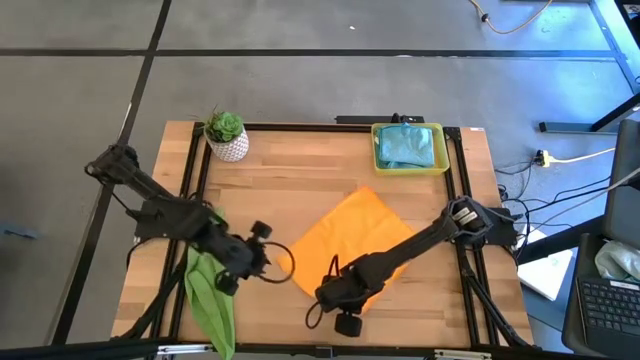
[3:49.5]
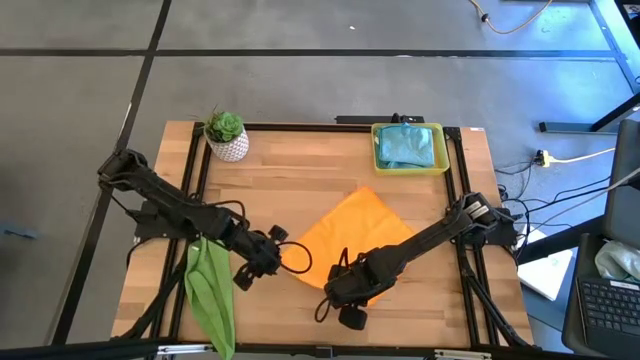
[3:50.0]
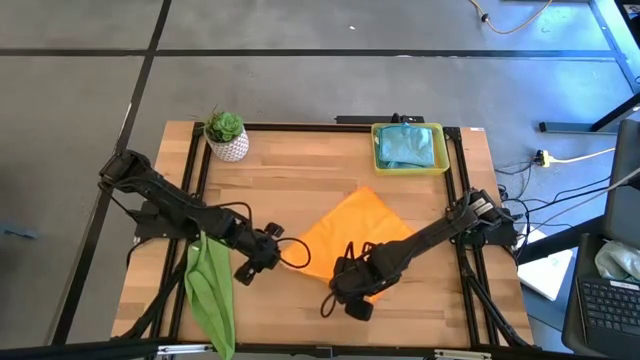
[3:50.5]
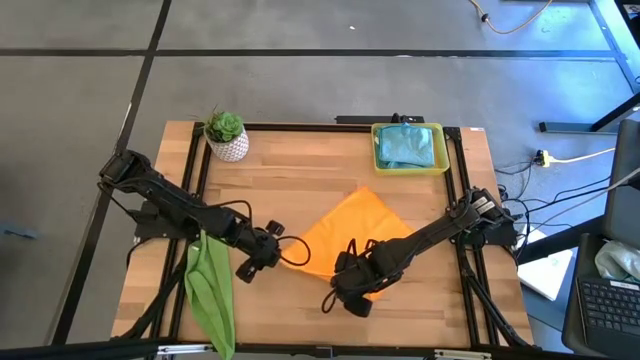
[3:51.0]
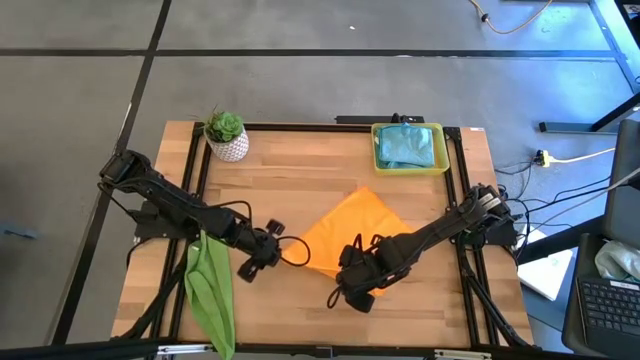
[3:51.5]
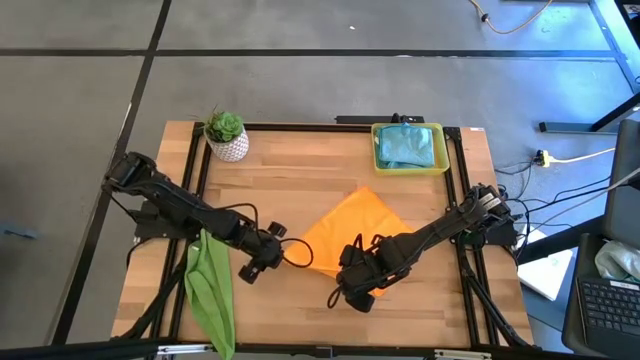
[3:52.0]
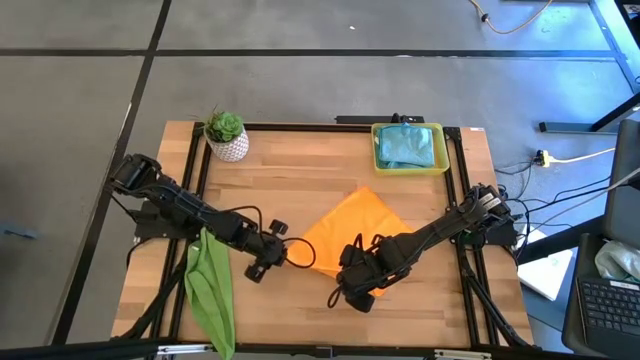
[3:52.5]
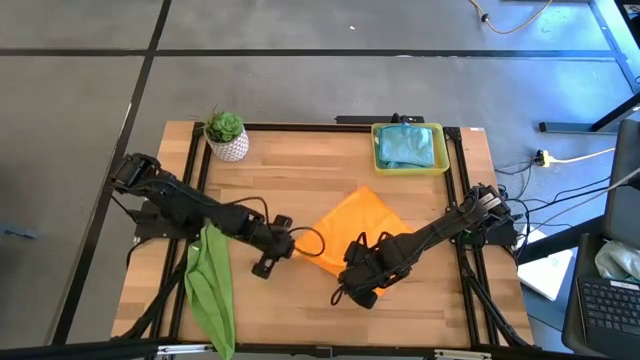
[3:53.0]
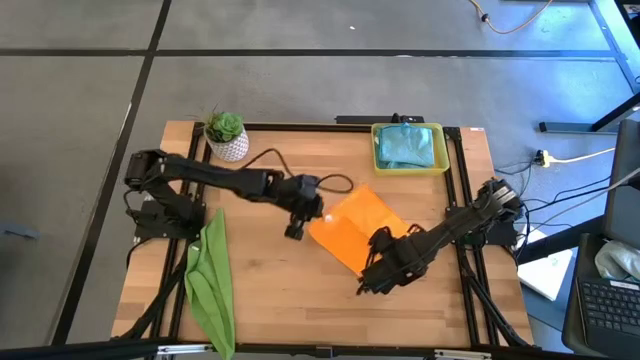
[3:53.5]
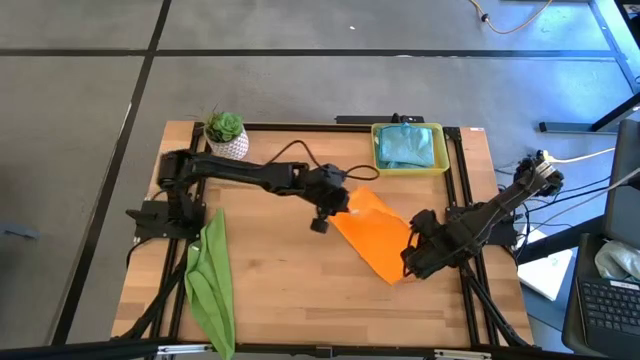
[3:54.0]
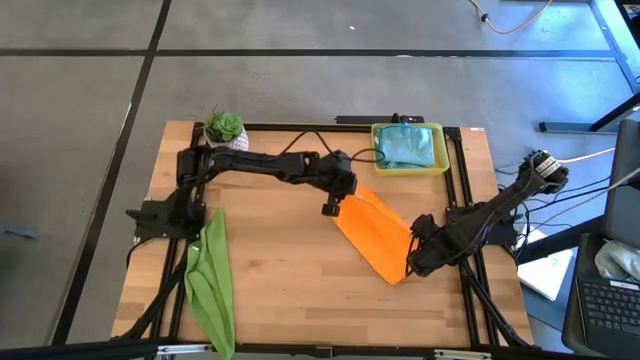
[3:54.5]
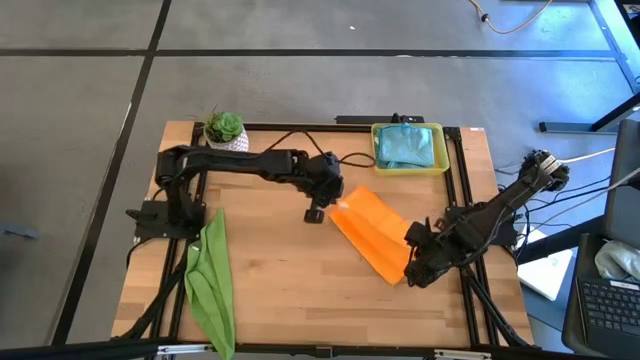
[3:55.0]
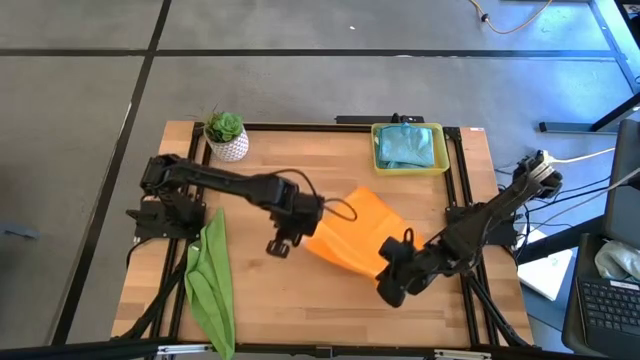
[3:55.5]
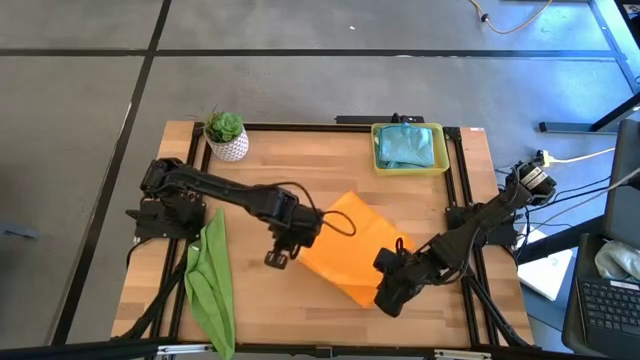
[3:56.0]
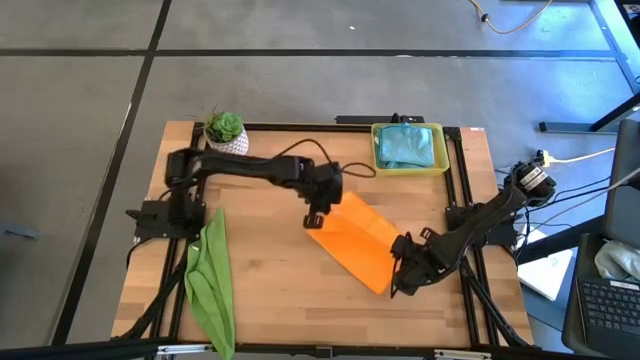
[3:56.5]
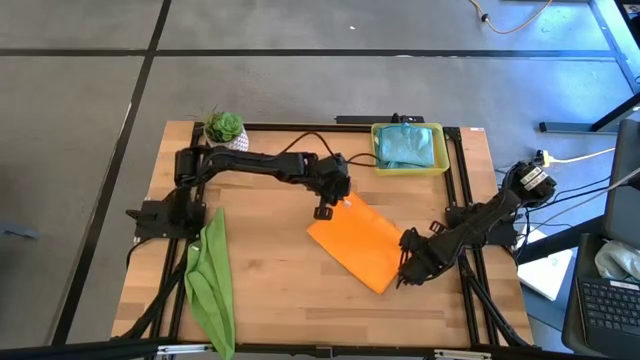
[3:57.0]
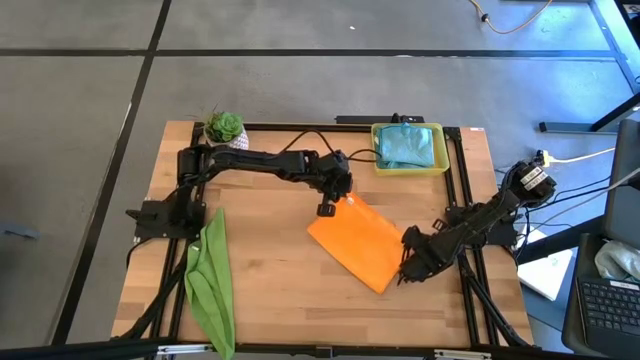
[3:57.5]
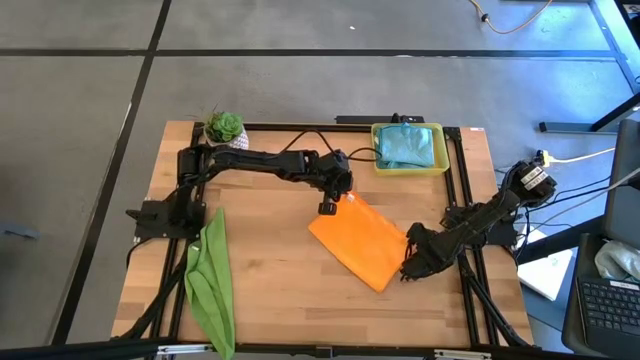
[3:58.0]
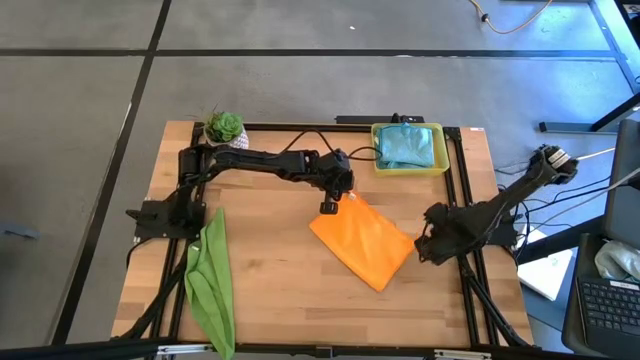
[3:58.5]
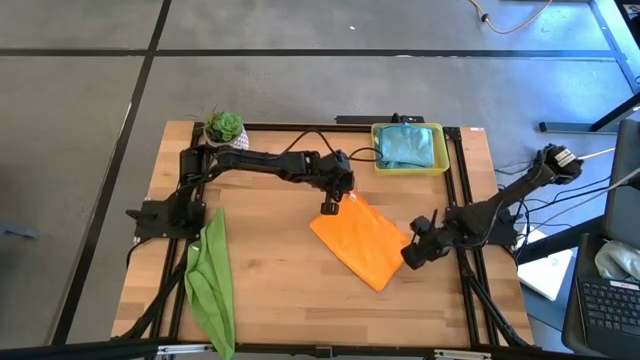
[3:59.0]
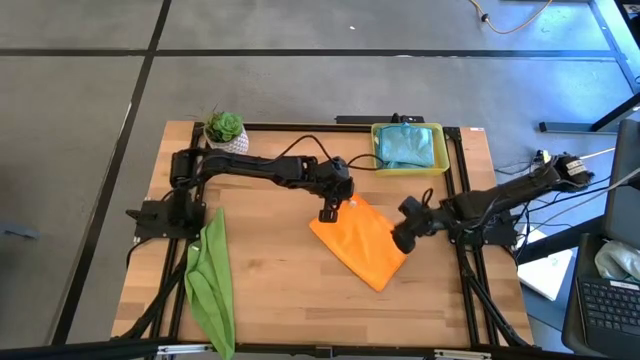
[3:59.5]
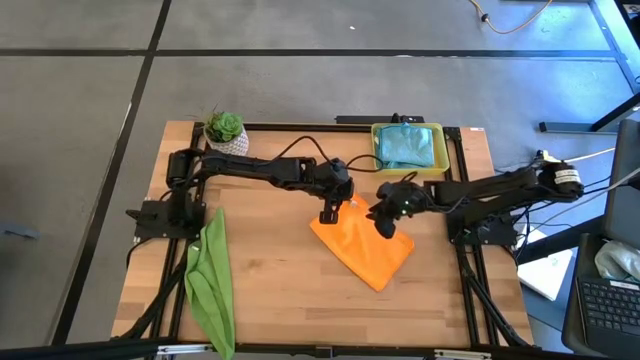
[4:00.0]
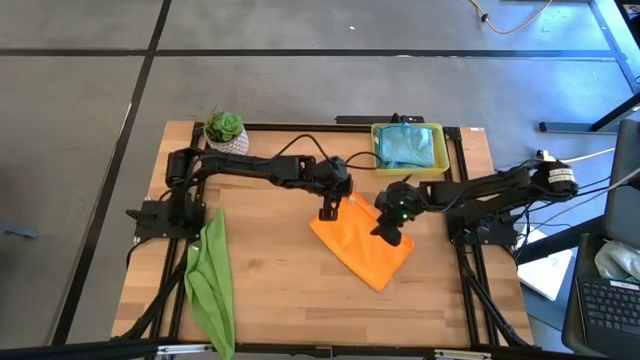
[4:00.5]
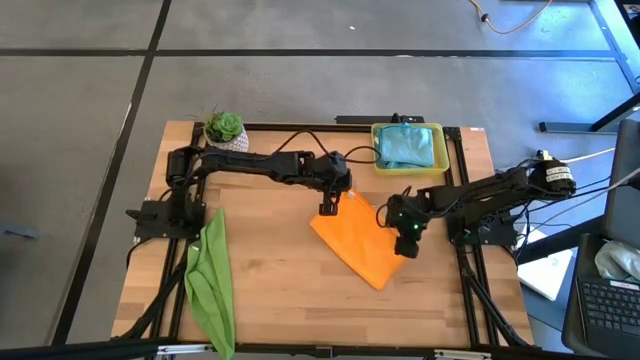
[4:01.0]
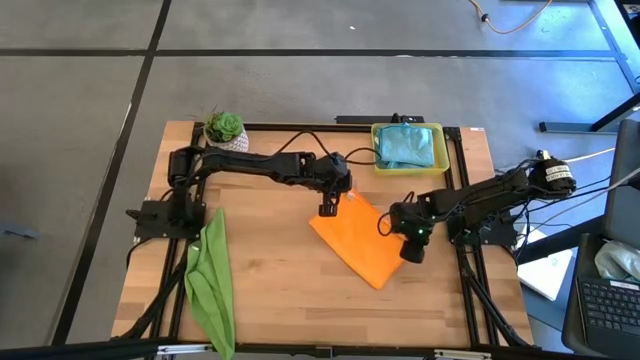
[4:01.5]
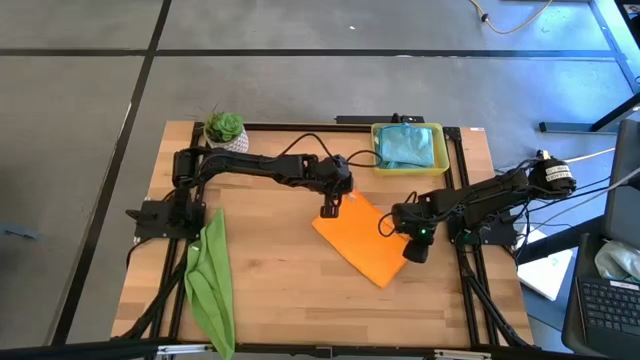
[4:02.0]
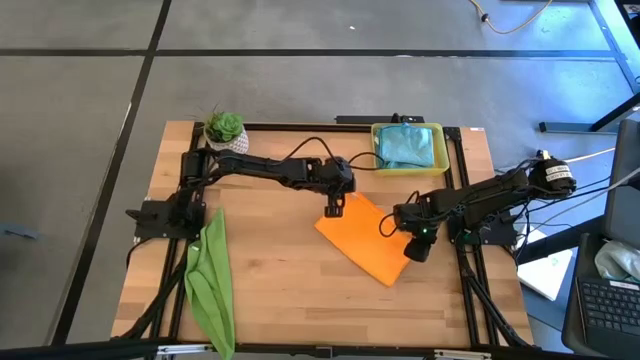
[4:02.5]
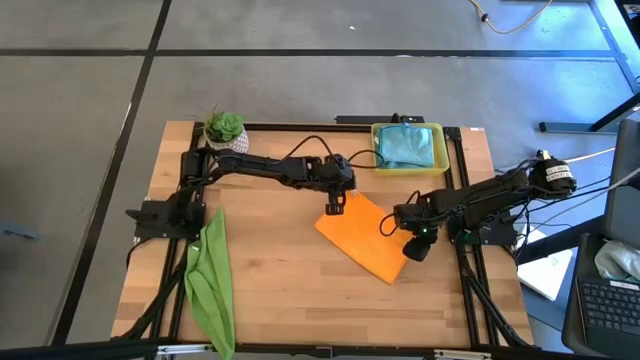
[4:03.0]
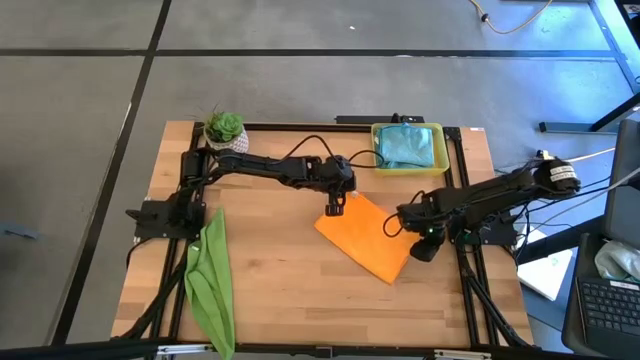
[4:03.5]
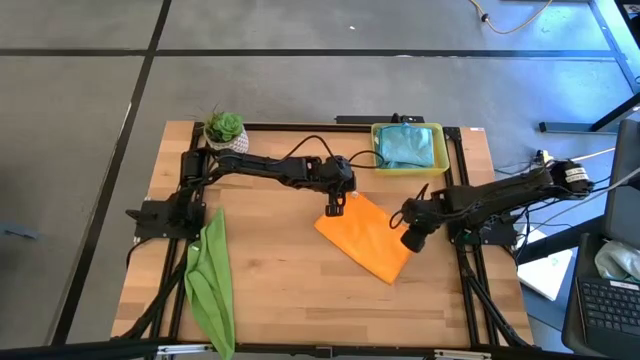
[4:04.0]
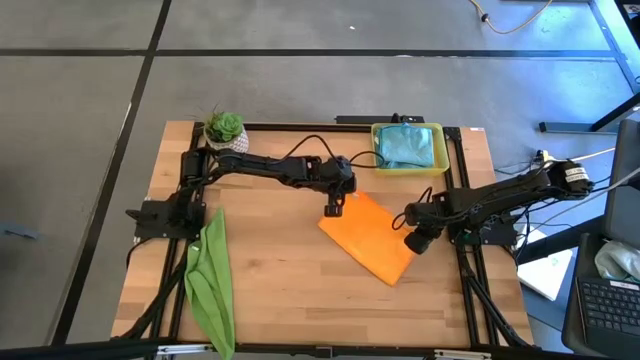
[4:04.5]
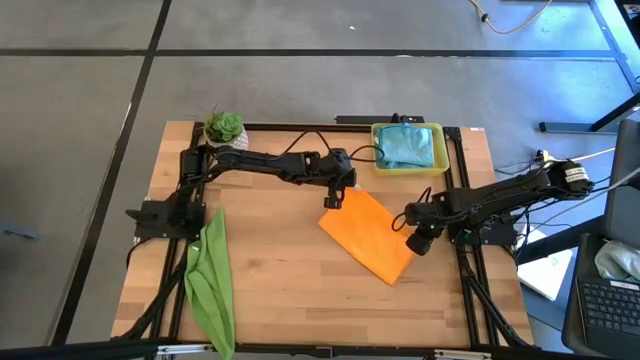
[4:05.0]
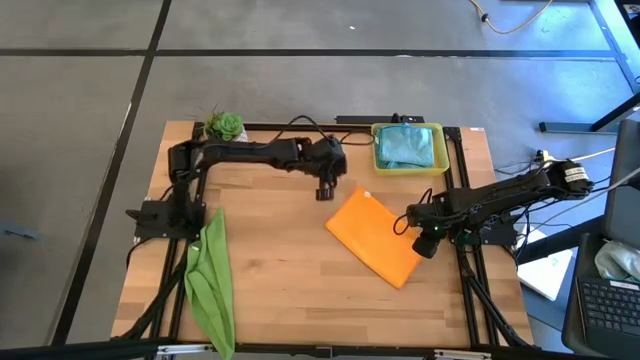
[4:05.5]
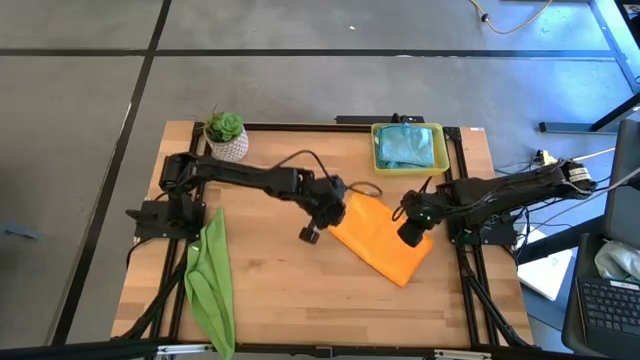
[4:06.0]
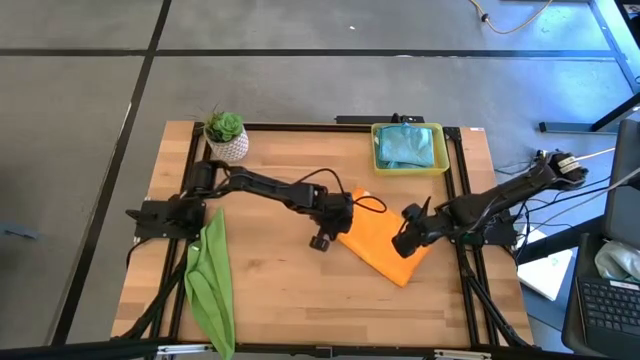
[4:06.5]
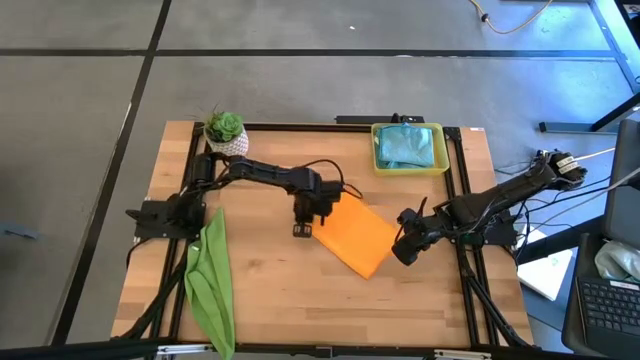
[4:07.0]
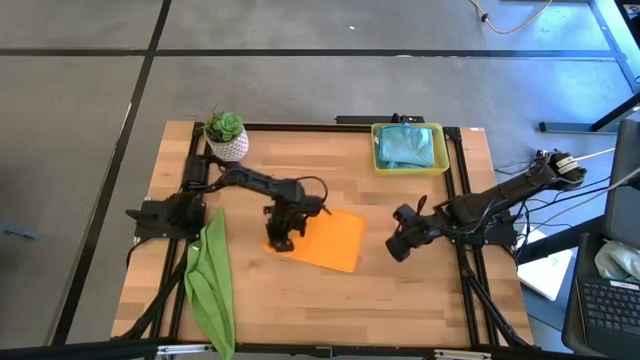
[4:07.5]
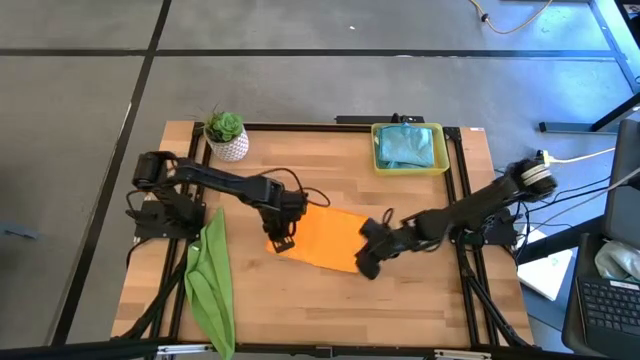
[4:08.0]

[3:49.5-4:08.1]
Task: Fold microfiber towels
Fold the orange microfiber towel

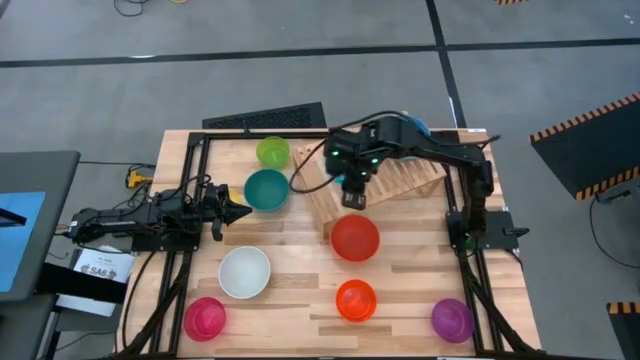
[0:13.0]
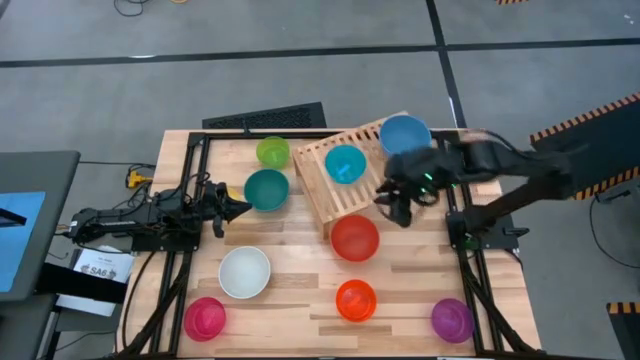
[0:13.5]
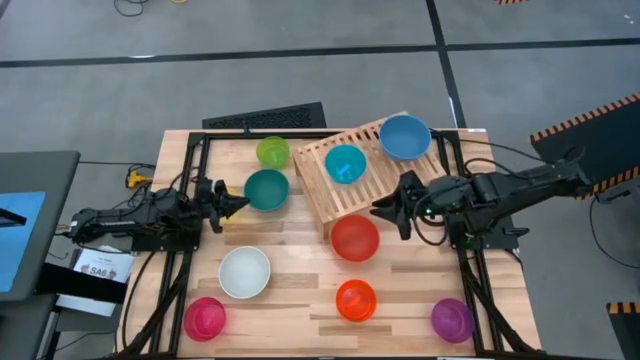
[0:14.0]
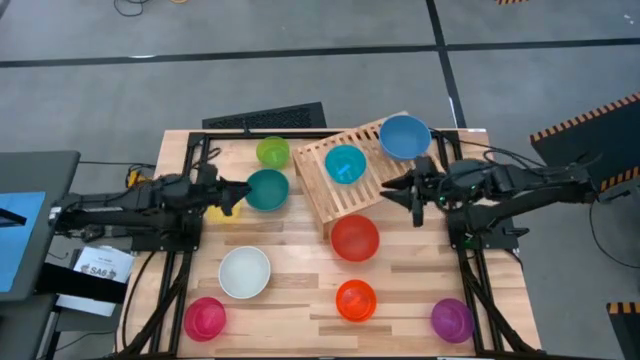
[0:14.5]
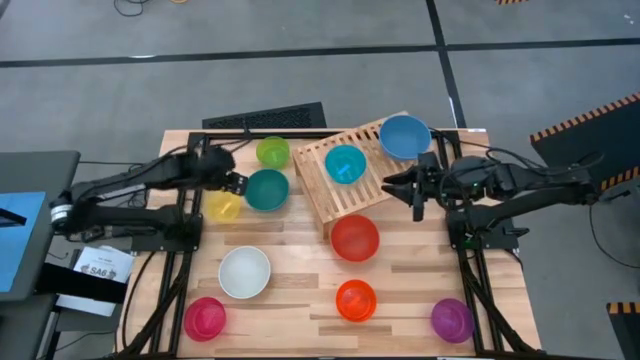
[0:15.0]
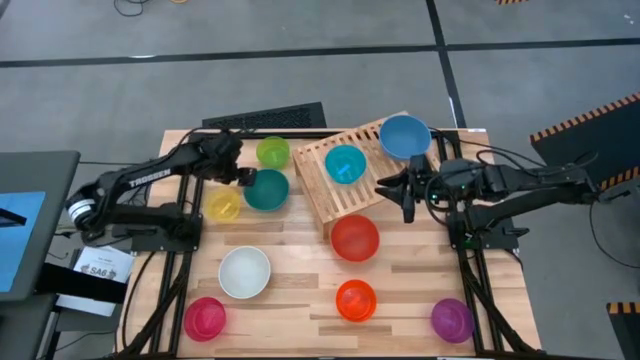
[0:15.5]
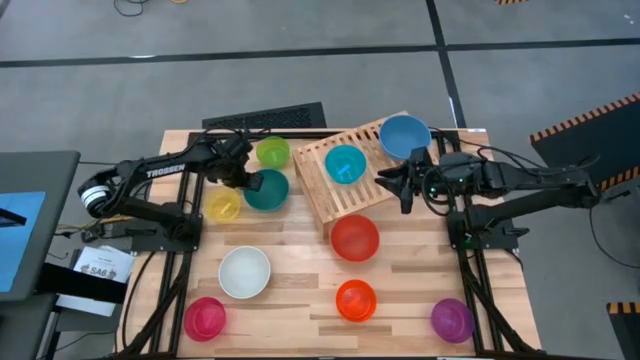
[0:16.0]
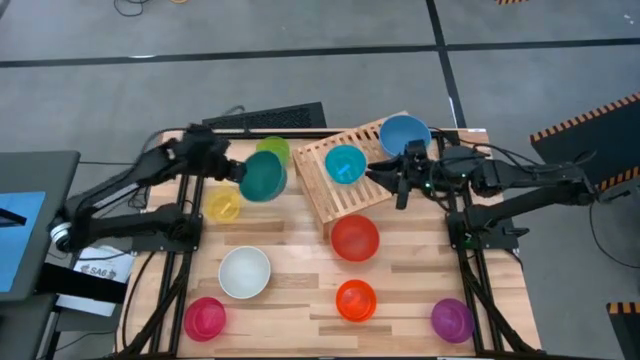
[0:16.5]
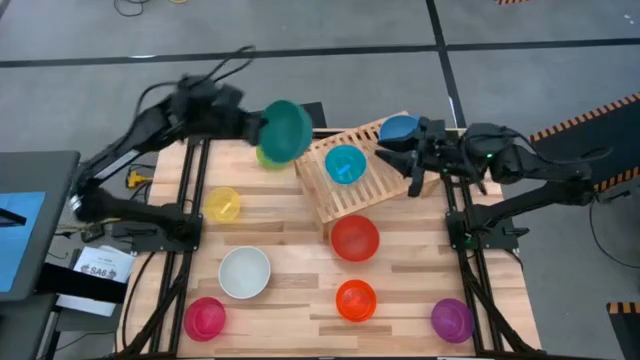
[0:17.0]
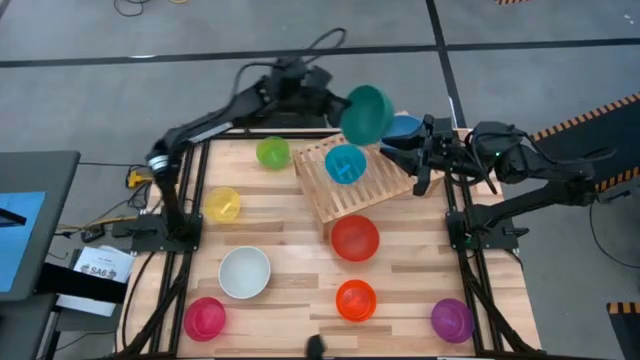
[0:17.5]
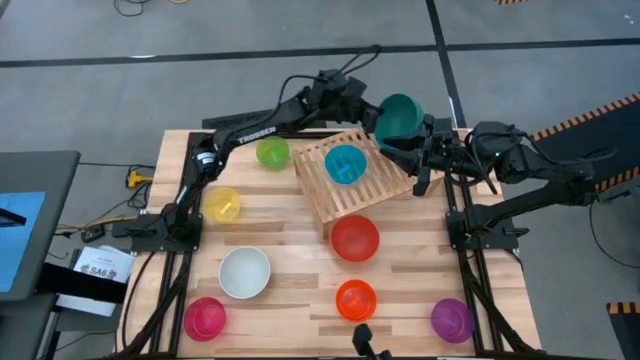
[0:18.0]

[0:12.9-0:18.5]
Task: Place and stack bowls onto a shelf
Stack the large green bowl on top of the large blue bowl on the shelf
